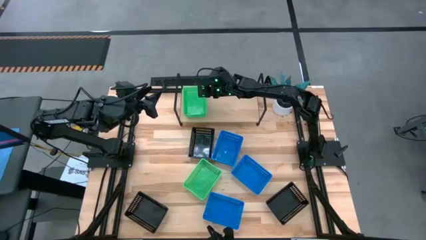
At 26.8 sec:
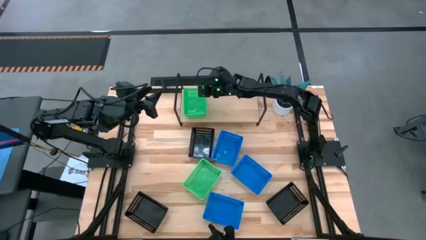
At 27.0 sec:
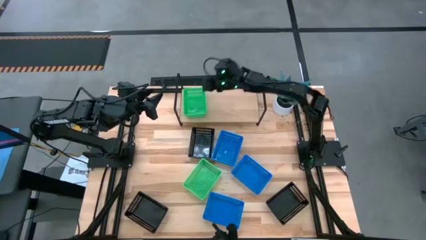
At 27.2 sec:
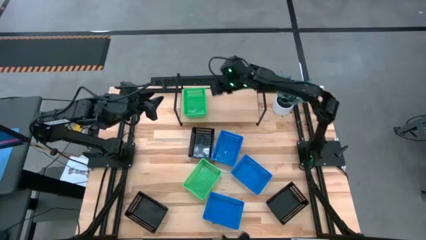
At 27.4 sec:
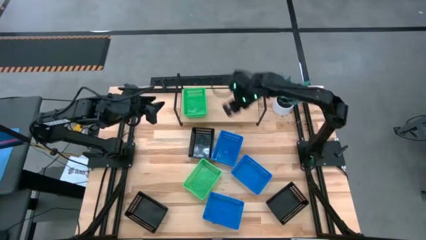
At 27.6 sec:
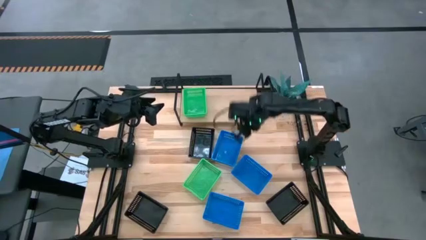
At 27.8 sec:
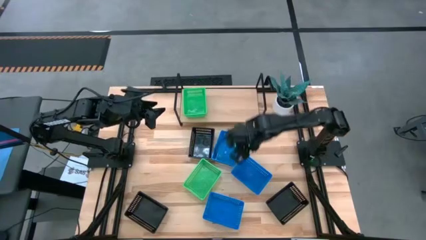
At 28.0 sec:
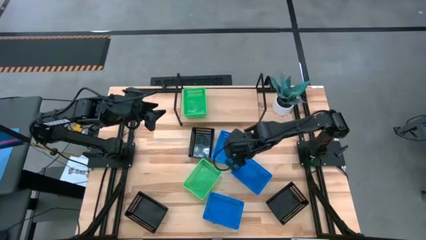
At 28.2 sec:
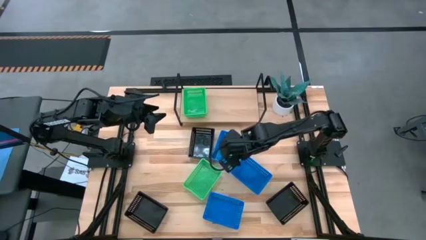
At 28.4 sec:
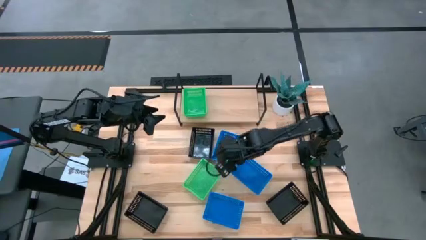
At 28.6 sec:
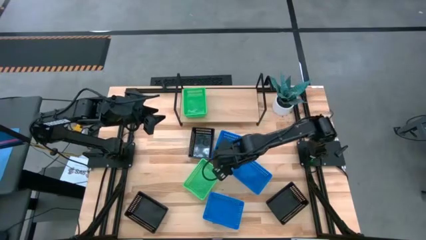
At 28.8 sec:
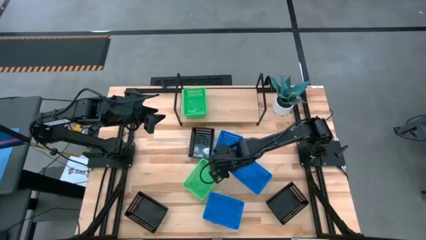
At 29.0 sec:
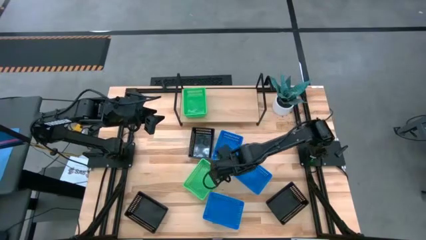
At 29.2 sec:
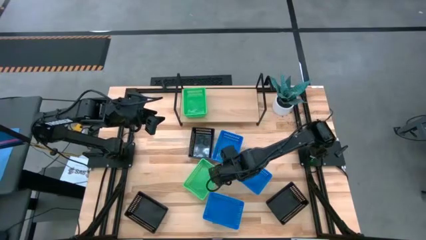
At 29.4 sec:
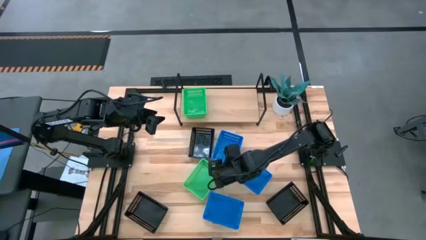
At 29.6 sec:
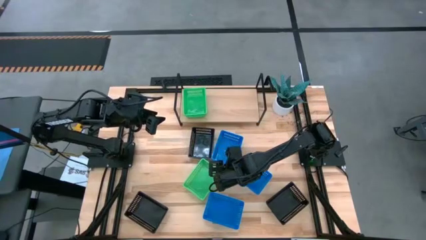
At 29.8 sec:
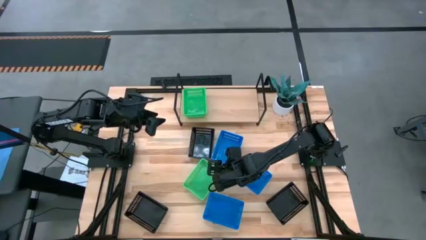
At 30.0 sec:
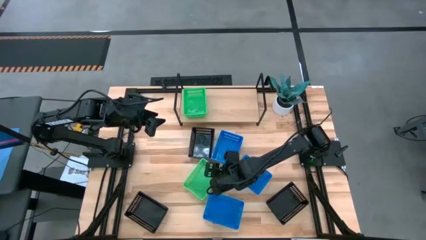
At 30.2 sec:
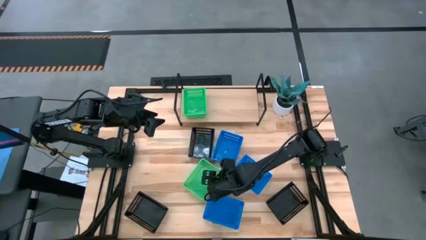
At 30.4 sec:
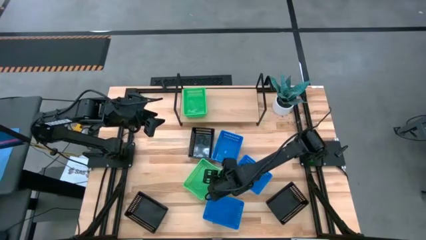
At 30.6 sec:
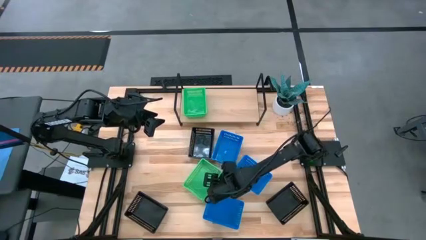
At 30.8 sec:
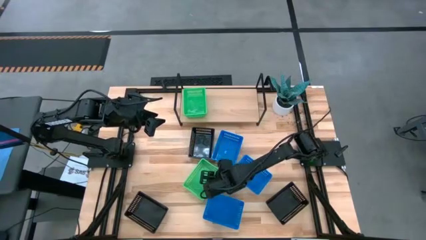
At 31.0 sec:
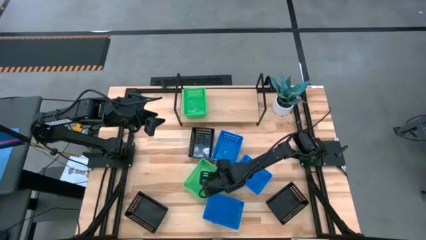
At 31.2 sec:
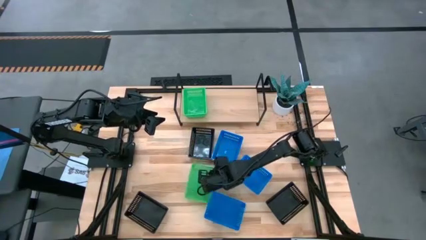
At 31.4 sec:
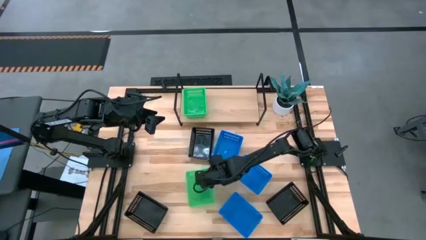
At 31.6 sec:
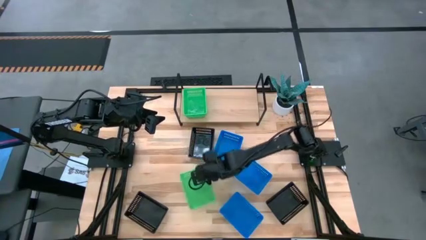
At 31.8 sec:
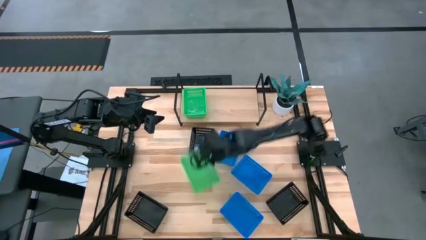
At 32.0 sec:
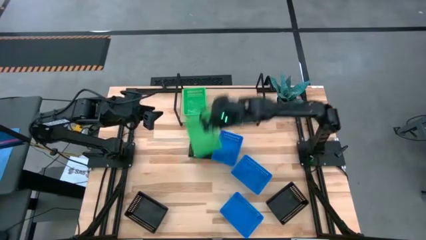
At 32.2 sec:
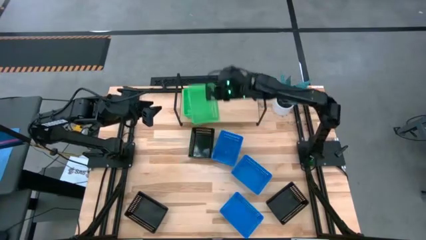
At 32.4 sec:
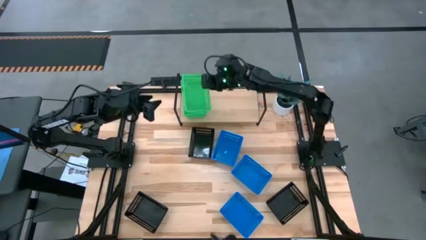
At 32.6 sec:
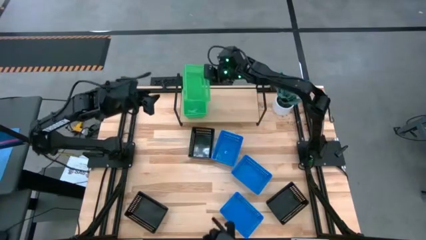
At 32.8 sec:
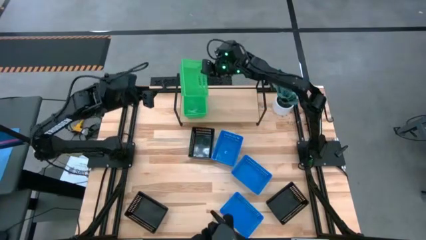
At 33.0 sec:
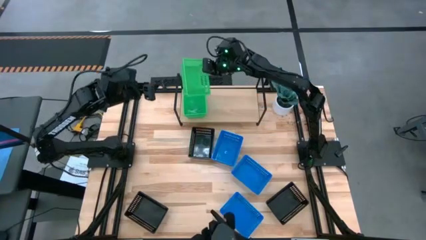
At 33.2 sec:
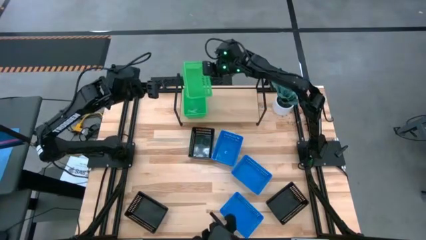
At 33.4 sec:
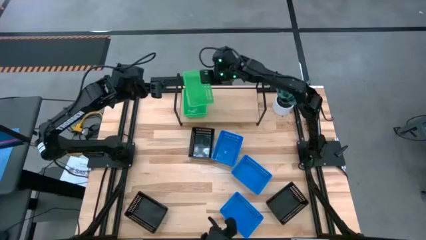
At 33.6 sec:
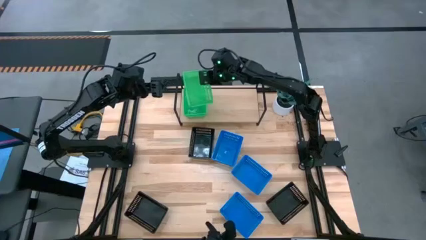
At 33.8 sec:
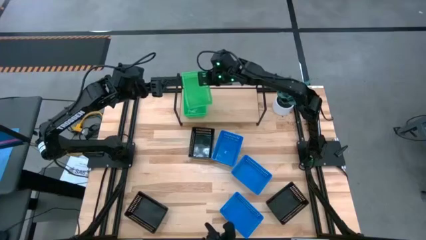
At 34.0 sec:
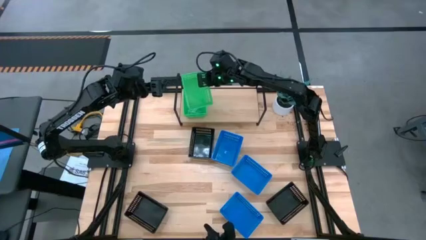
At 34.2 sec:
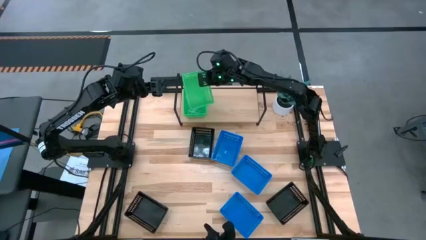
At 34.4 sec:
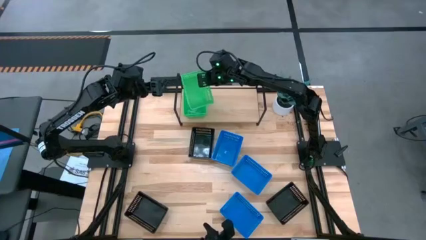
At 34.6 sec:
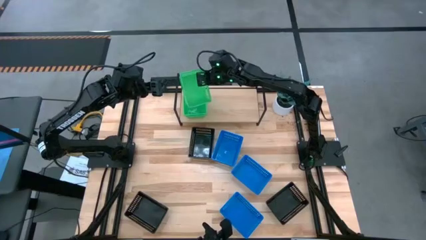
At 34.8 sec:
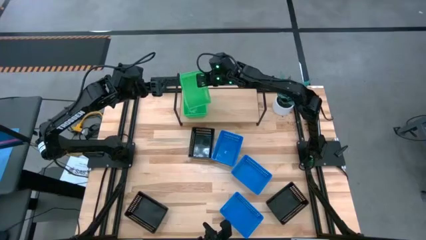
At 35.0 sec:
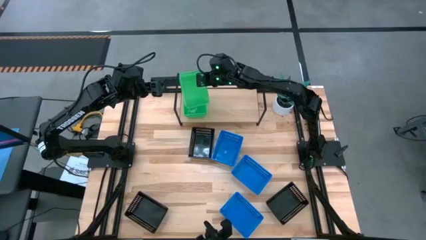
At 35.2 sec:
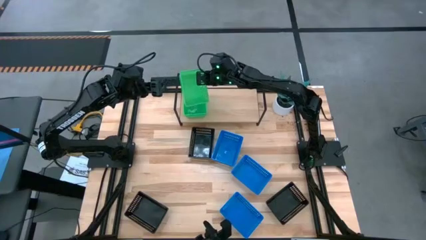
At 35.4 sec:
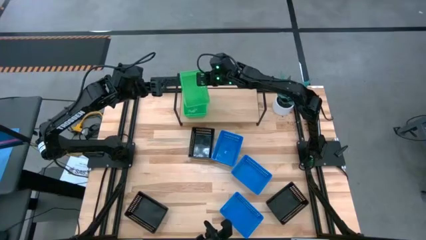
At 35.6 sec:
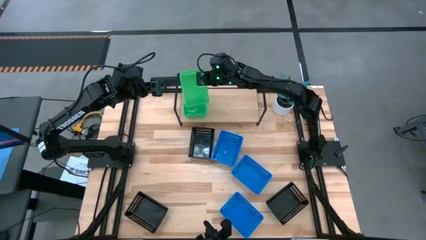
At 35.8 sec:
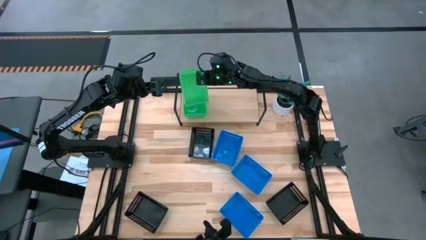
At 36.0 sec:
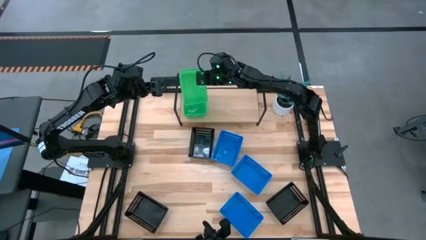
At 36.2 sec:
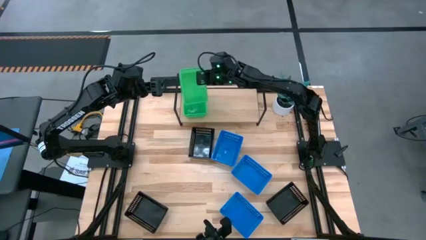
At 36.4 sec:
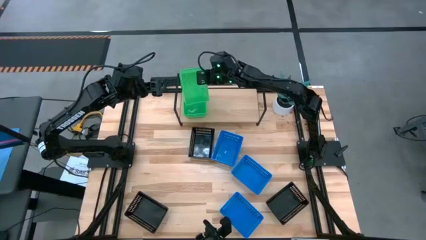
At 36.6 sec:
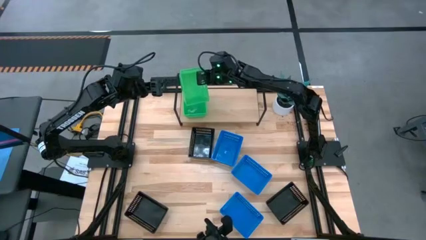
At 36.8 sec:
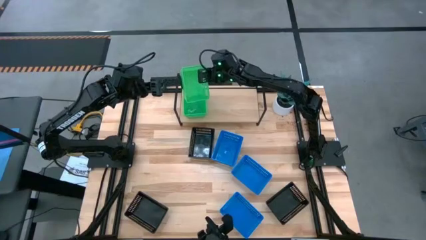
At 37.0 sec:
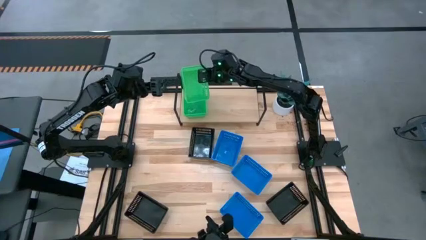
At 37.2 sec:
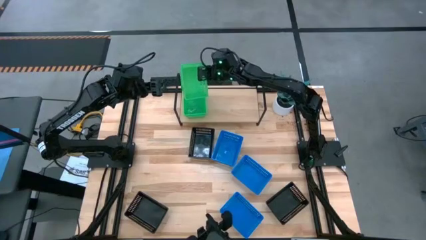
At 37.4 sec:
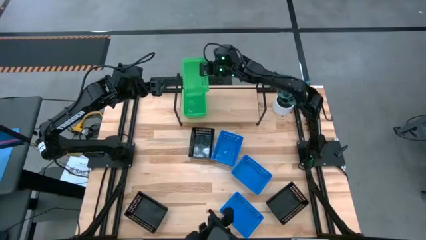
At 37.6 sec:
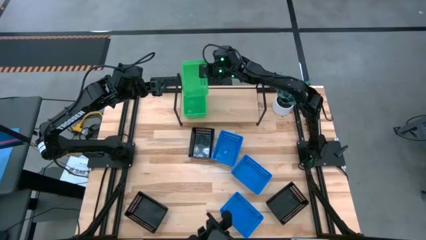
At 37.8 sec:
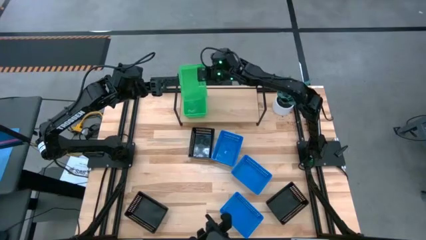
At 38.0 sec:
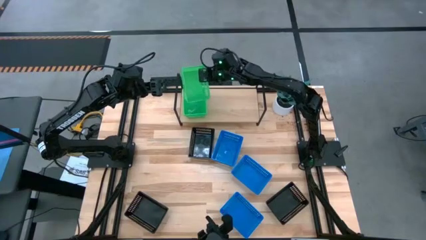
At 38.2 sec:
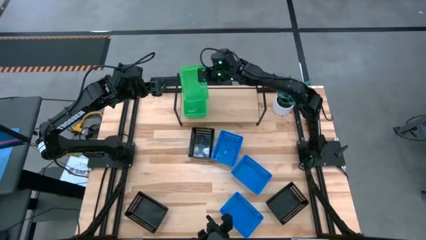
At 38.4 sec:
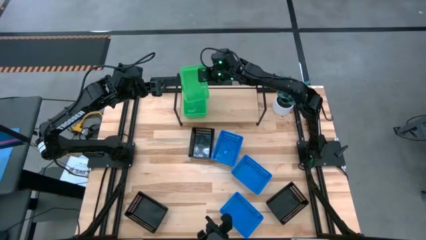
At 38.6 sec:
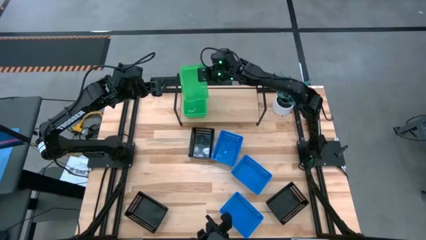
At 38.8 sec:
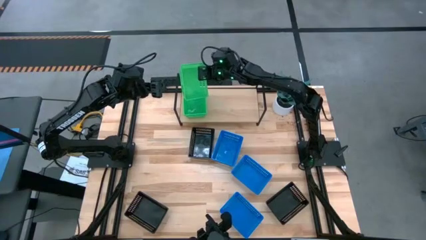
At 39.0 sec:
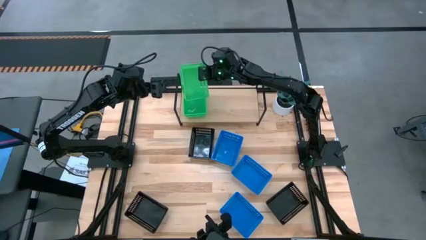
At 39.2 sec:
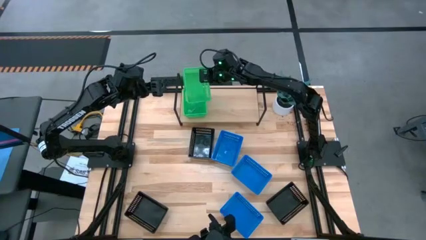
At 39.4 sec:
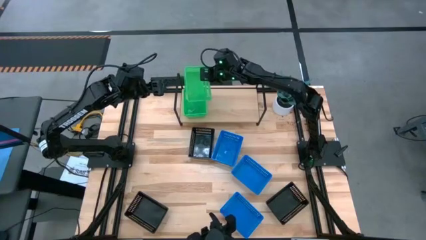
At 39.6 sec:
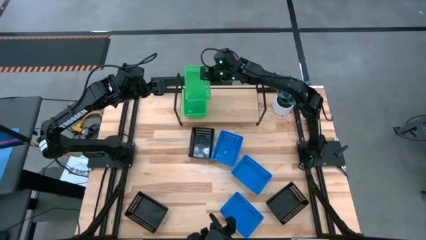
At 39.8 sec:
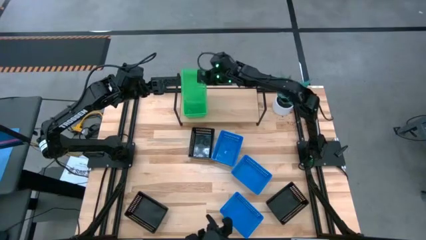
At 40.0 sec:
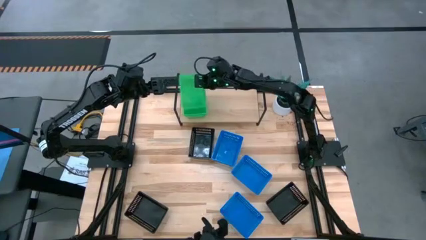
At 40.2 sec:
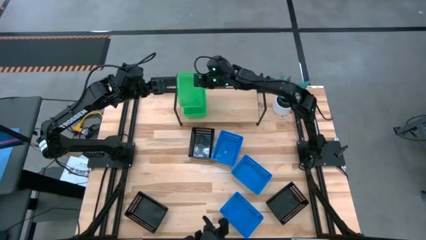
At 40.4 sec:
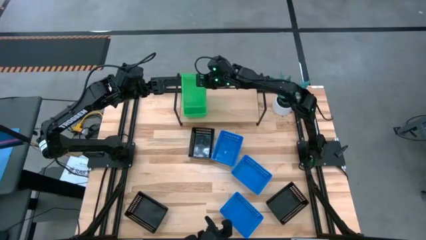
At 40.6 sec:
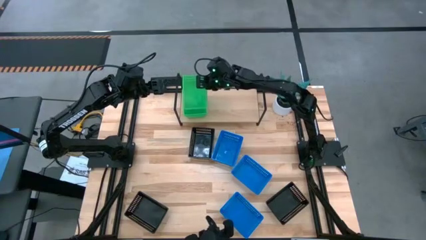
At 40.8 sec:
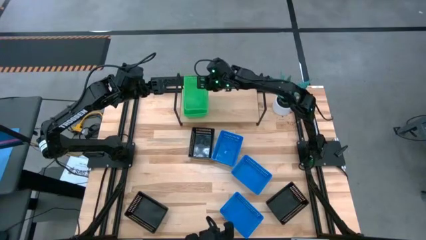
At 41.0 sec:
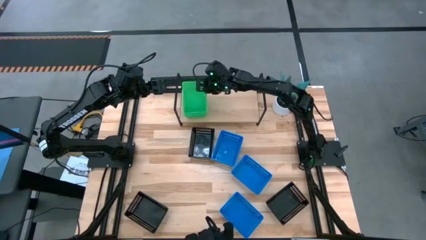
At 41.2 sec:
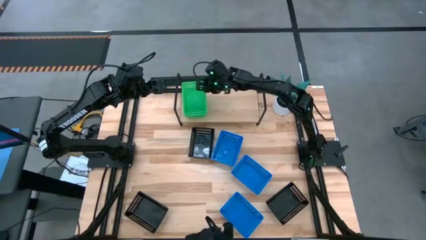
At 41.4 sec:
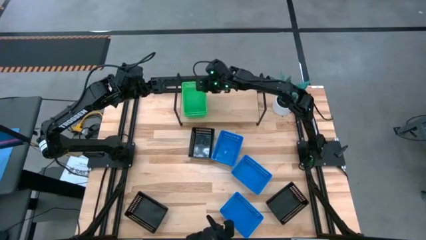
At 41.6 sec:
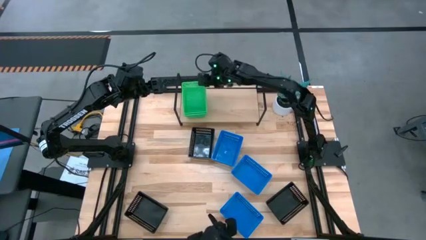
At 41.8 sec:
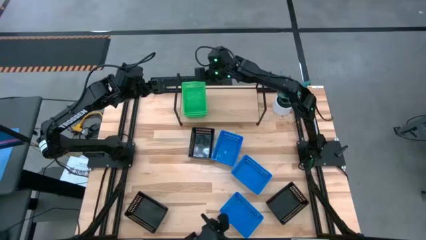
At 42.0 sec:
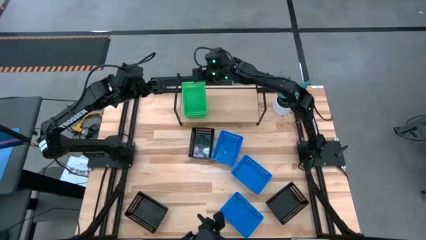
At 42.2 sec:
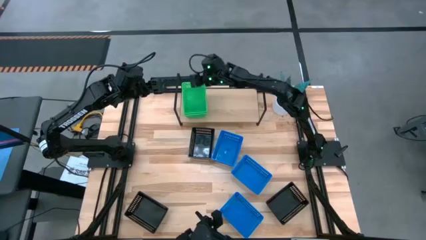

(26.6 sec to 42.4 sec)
Task: Stack baskets on shelf by color
Stack the green bin on the other green bins on the shelf
